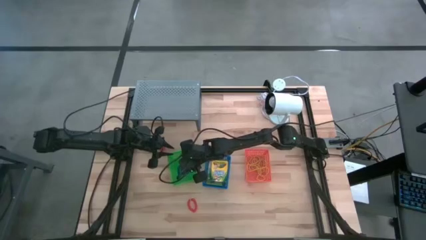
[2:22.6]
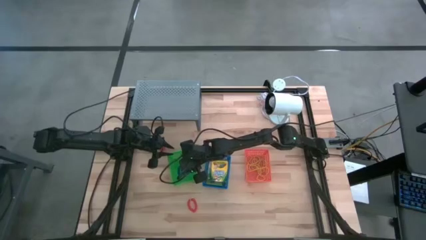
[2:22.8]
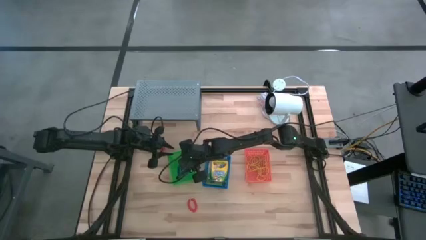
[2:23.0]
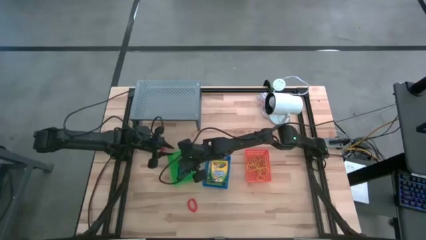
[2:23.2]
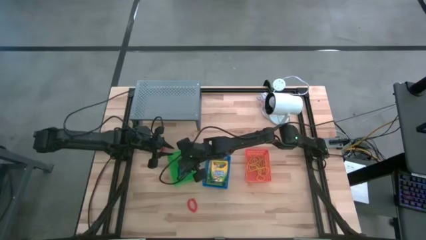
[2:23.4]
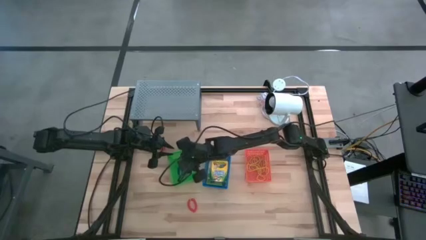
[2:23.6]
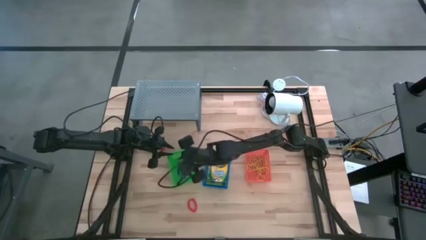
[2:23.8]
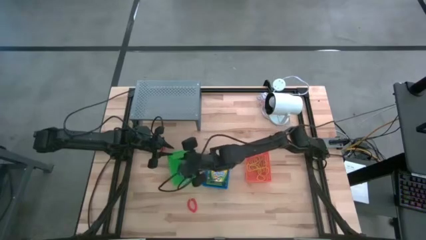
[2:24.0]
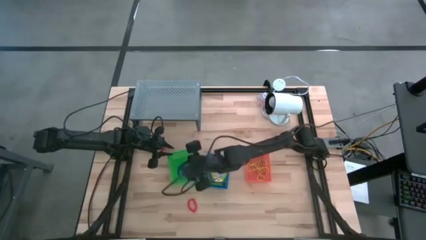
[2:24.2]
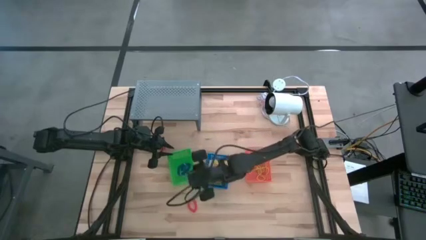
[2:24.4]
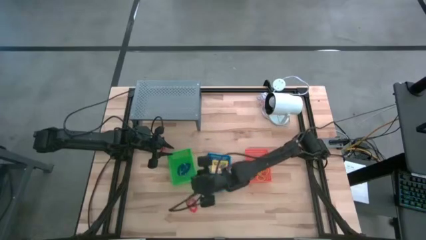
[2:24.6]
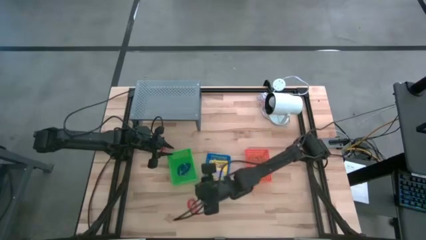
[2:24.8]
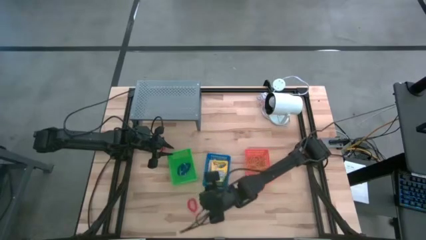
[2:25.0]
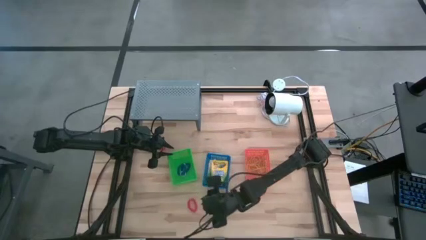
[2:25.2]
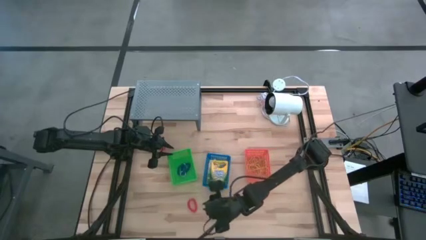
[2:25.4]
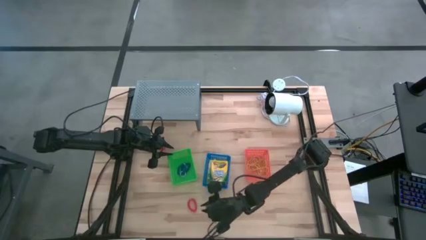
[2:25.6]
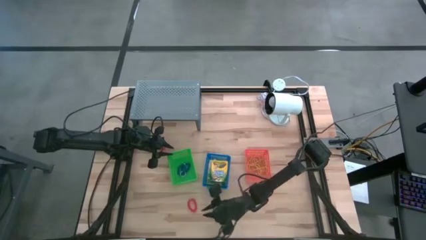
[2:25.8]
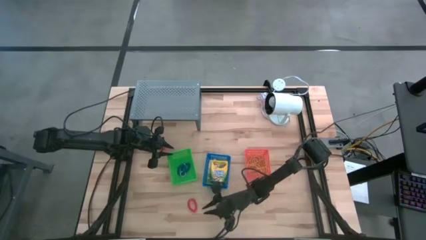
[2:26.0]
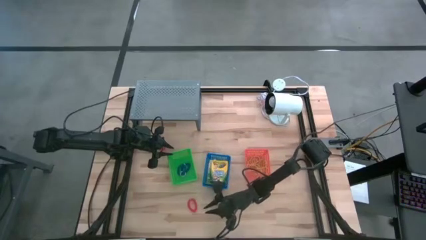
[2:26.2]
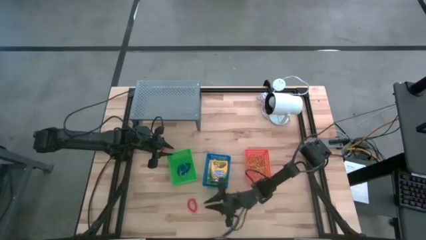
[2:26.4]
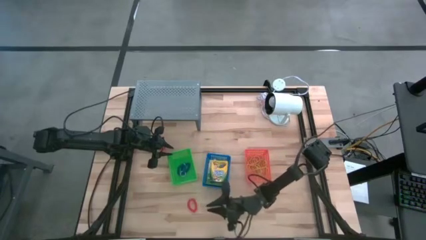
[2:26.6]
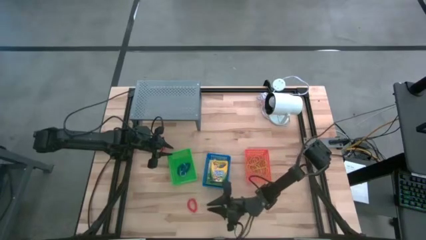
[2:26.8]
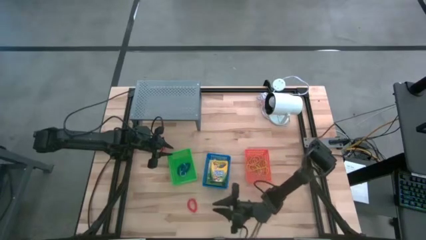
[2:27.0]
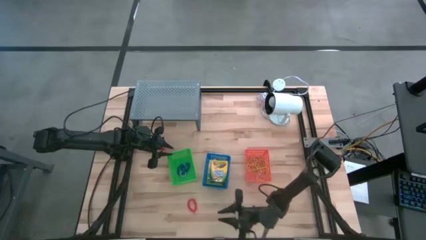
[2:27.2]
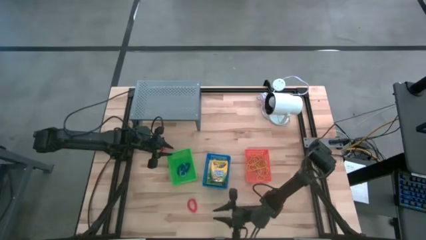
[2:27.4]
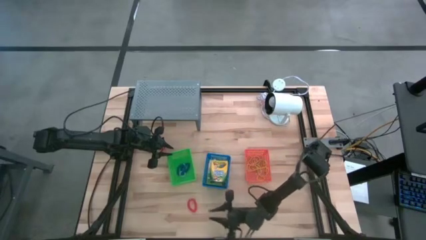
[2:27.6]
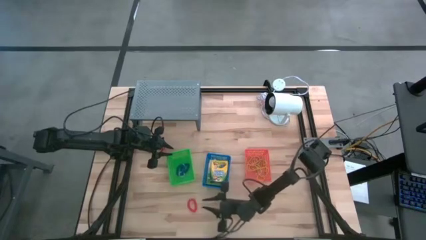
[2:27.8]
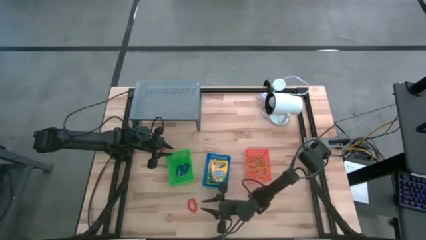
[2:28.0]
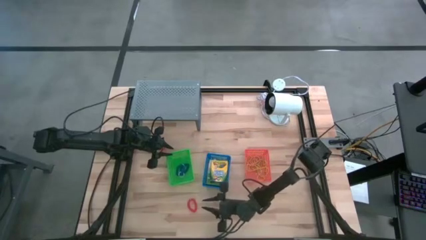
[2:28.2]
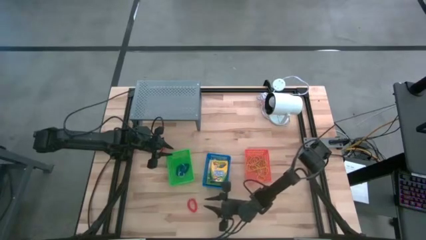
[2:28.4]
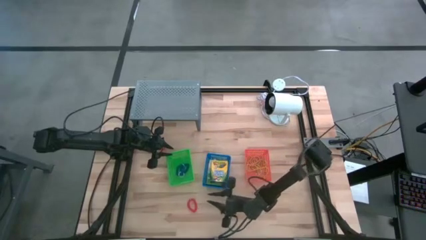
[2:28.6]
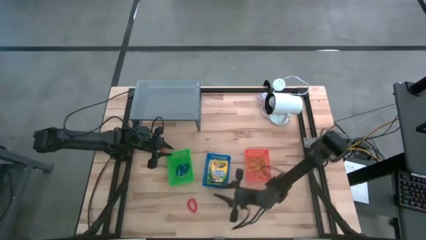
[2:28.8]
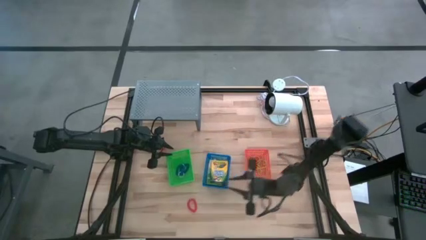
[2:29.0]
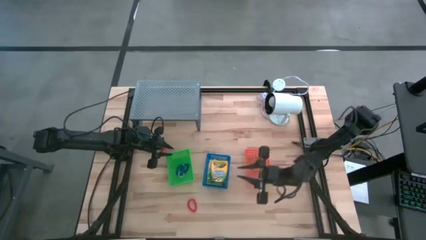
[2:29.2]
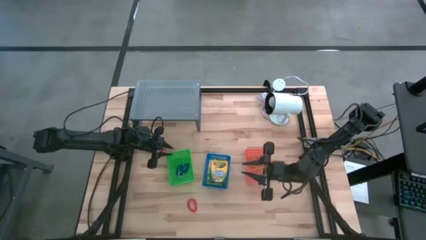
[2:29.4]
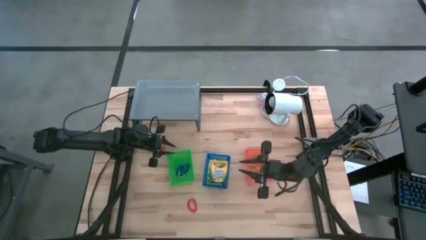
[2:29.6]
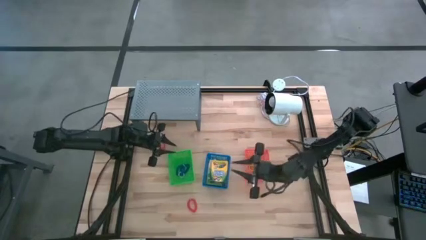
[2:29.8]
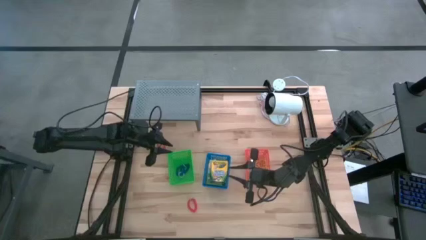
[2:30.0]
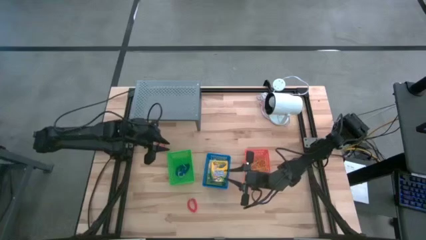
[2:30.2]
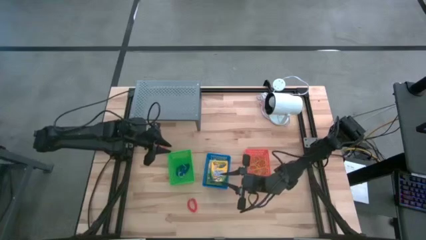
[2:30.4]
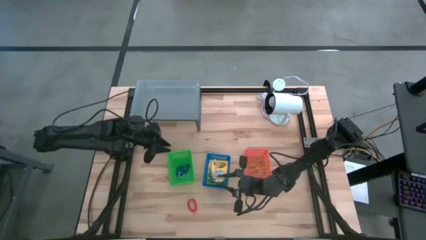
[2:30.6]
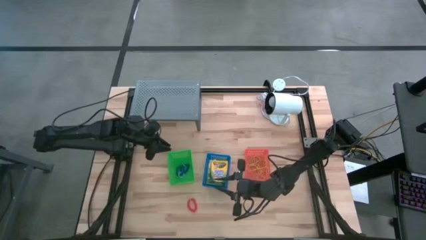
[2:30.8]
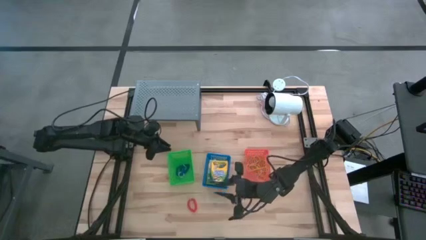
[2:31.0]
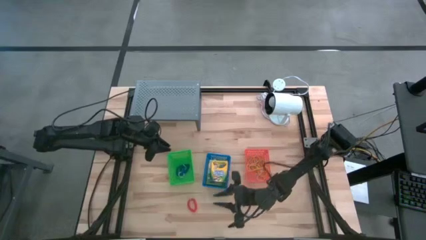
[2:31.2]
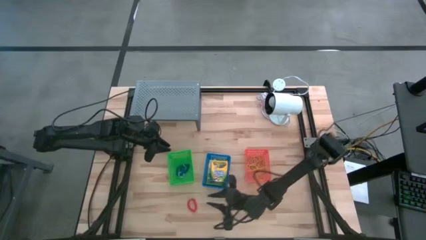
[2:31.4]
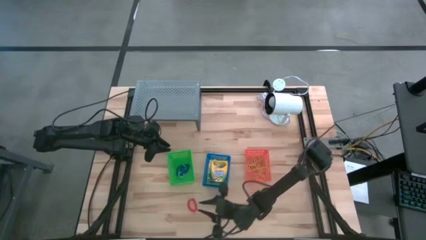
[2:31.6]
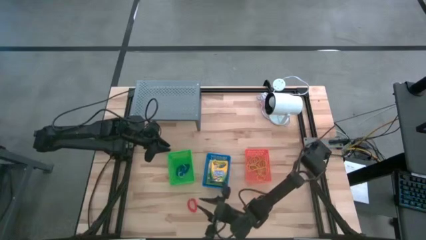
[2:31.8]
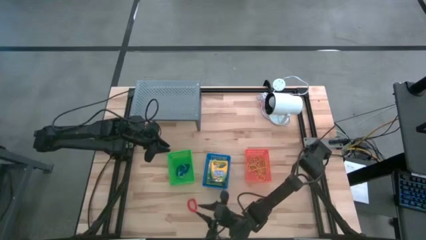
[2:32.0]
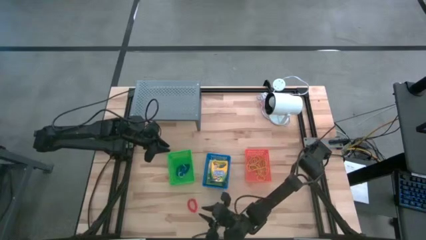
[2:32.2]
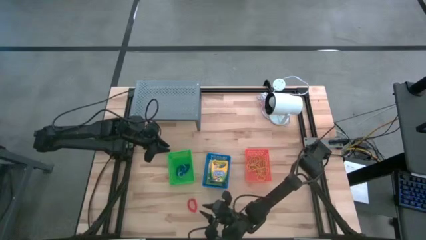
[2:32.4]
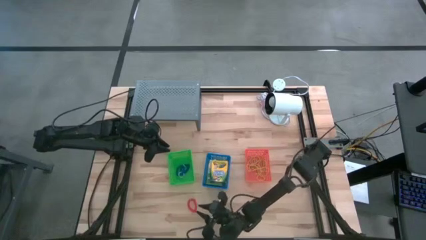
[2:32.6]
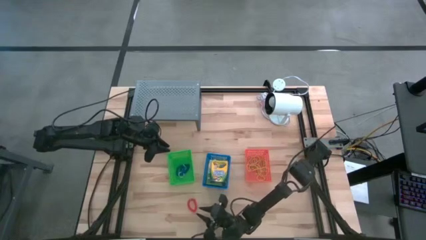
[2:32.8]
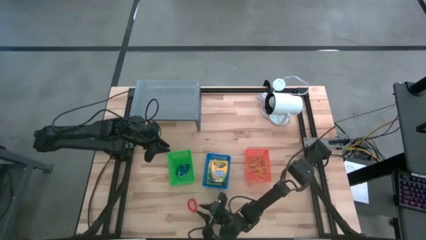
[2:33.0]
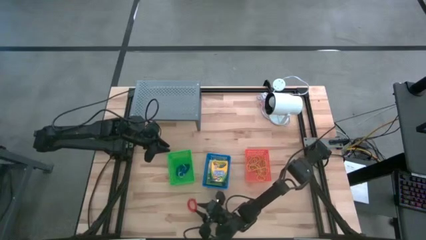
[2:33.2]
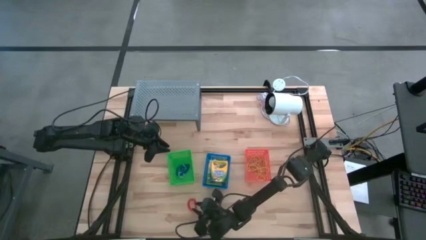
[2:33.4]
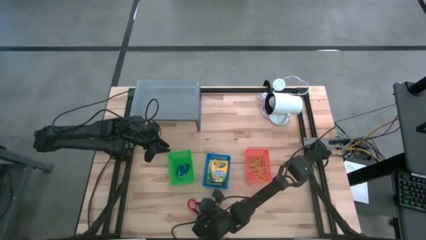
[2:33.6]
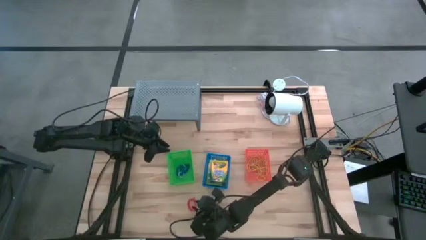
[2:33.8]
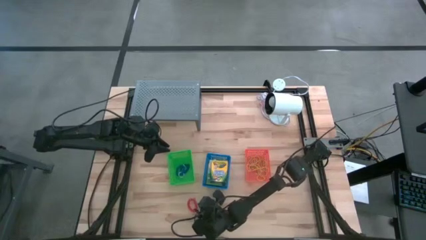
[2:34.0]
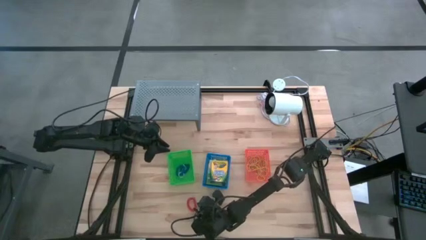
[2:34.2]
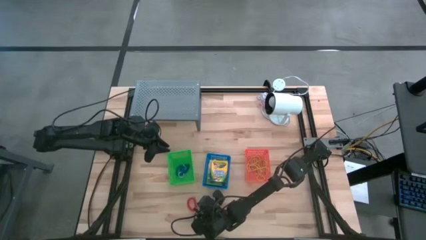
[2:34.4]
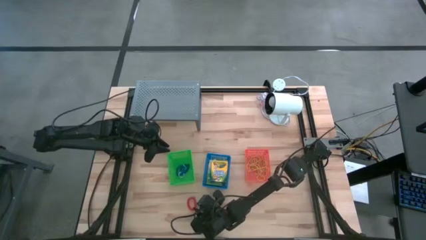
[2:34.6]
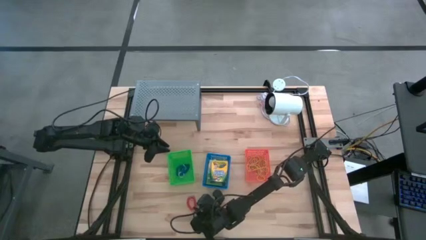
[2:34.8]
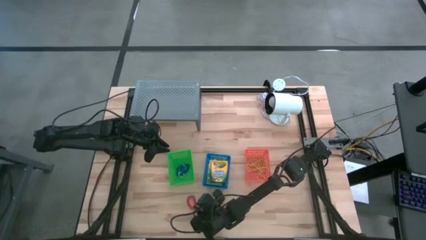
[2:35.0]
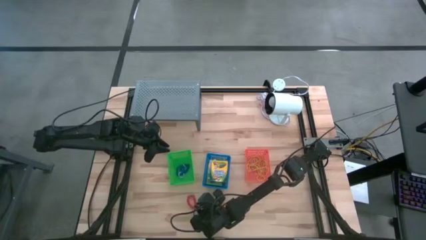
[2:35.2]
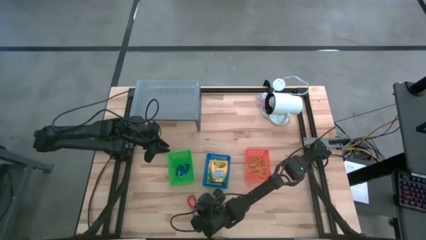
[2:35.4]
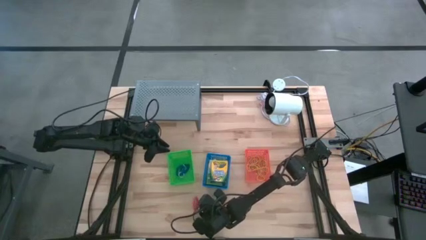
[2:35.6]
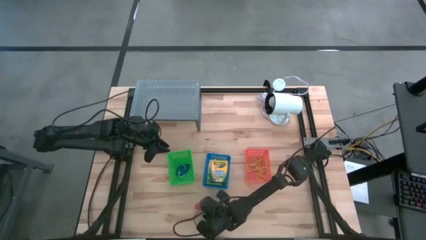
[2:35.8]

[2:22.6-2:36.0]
Task: Pick & Place Office Desk Supplies
Put the orange spring keychain into the green bin

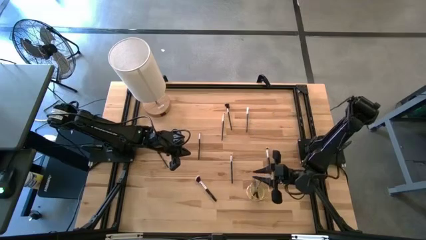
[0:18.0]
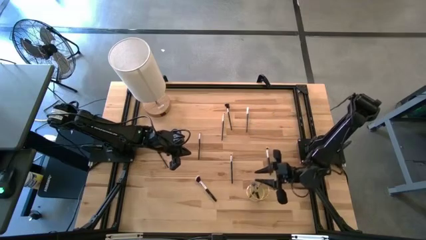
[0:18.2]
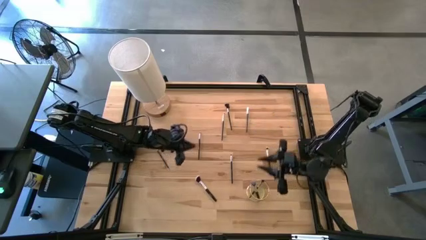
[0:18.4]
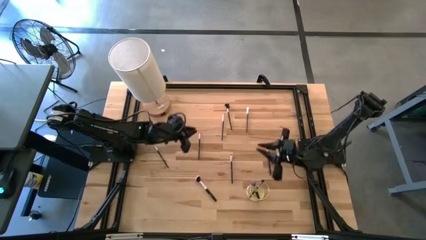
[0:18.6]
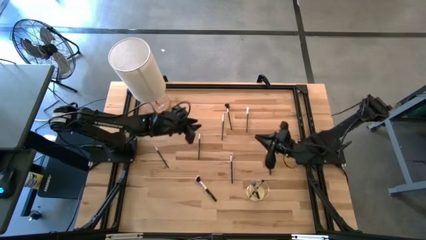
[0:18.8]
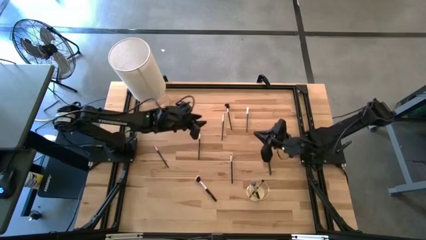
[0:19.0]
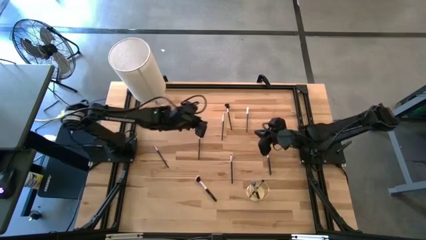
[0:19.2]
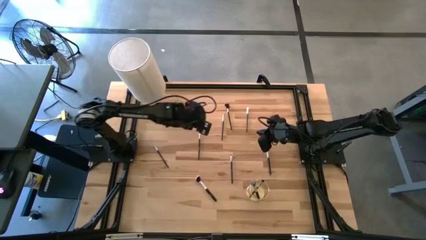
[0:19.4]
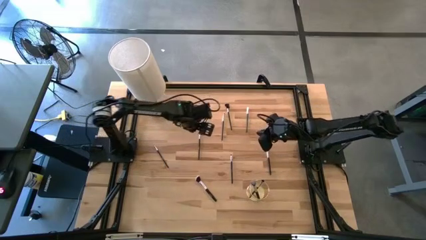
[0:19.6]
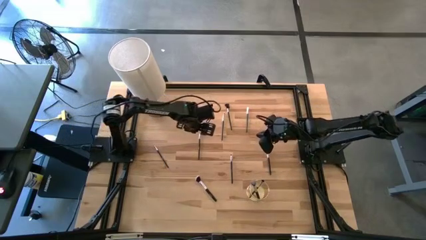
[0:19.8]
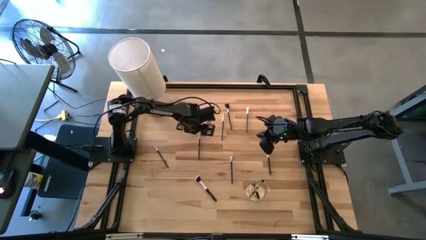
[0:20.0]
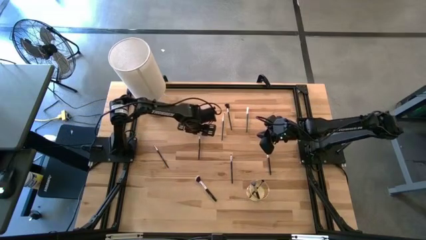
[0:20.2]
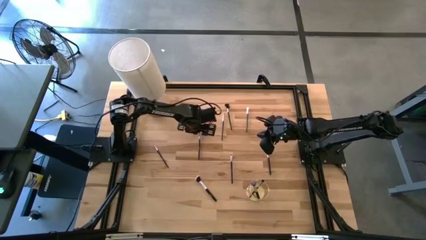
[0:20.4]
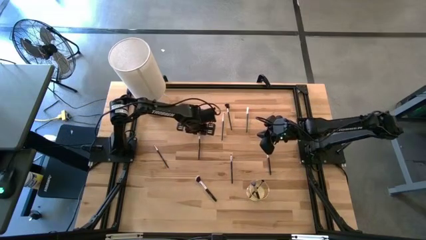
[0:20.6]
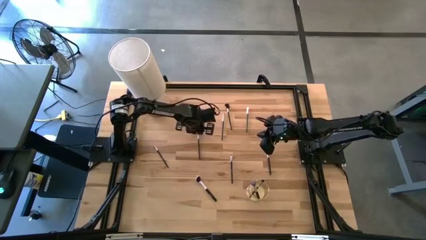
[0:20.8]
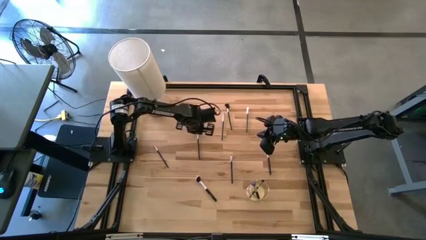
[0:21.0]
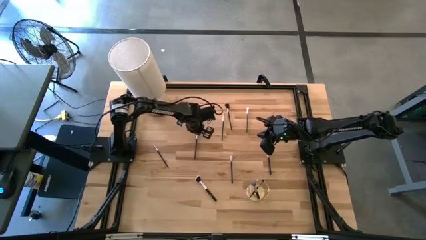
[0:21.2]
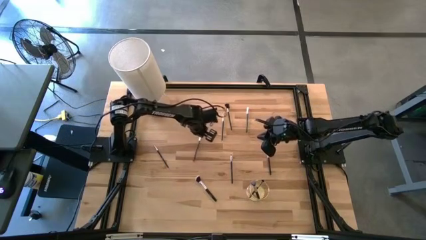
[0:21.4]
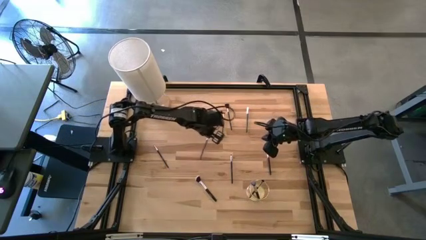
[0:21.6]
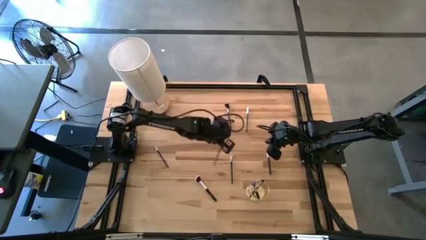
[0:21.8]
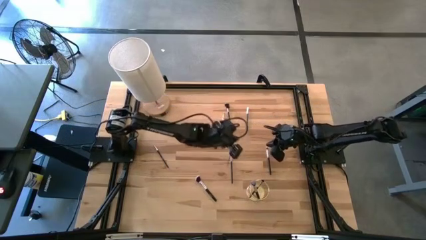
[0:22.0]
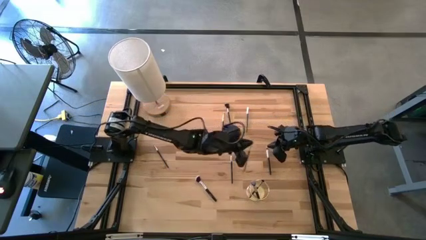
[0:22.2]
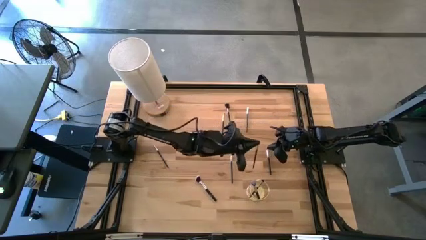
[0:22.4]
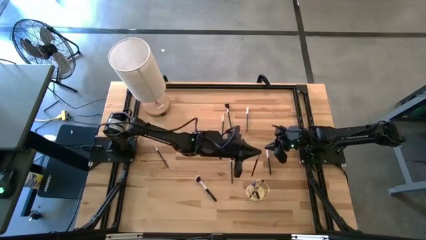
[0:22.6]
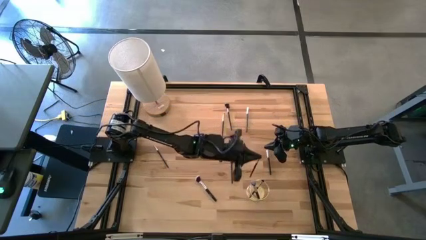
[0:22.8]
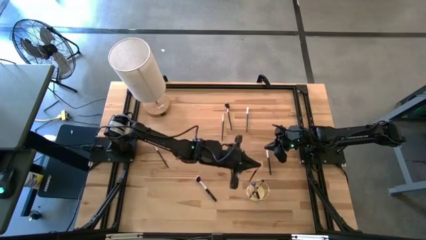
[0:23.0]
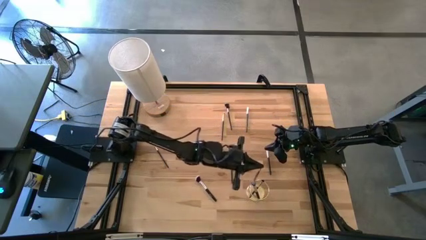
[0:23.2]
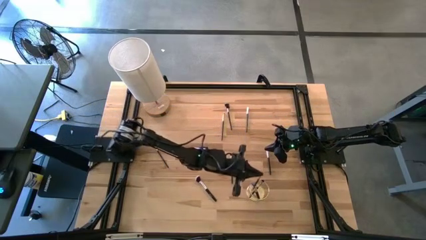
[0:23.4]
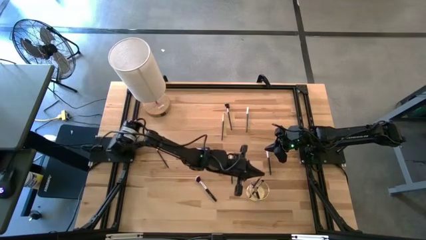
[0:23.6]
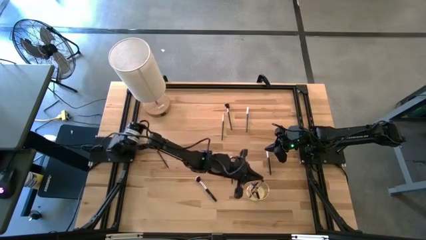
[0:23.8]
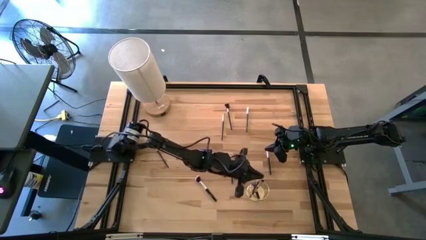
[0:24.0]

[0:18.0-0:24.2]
Task: Pick & Place Makeup Brushes
Put the eyeshadow brush into the pens makeup holder
